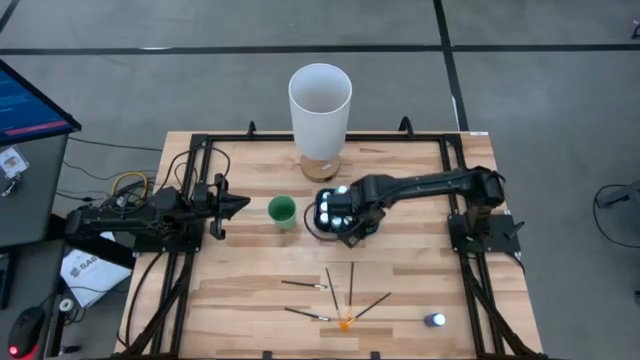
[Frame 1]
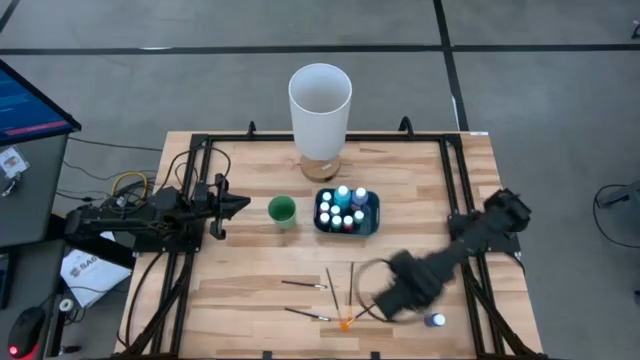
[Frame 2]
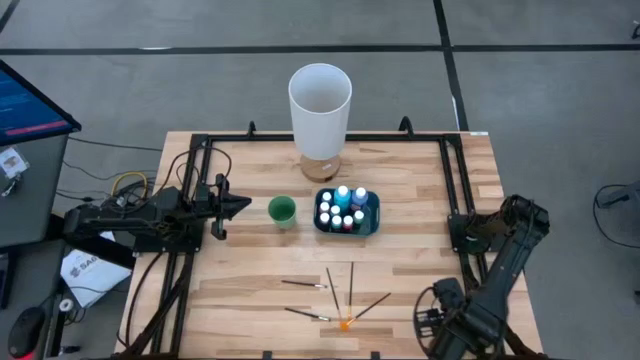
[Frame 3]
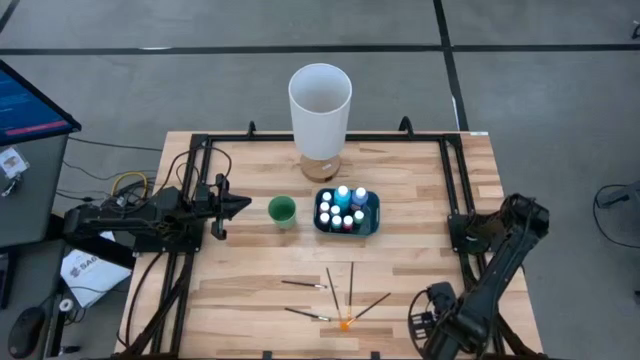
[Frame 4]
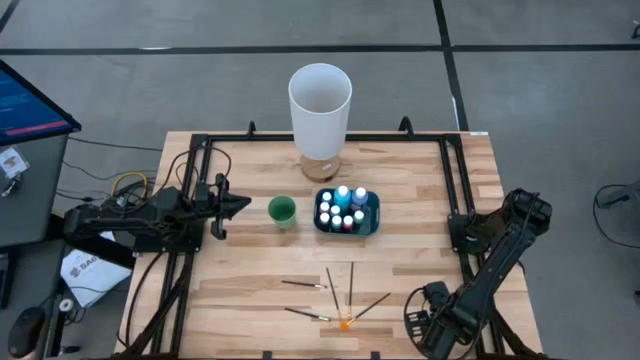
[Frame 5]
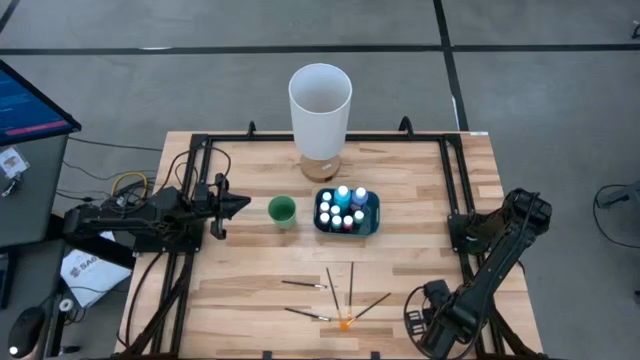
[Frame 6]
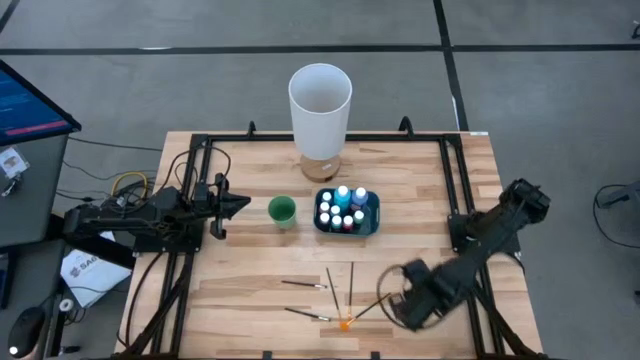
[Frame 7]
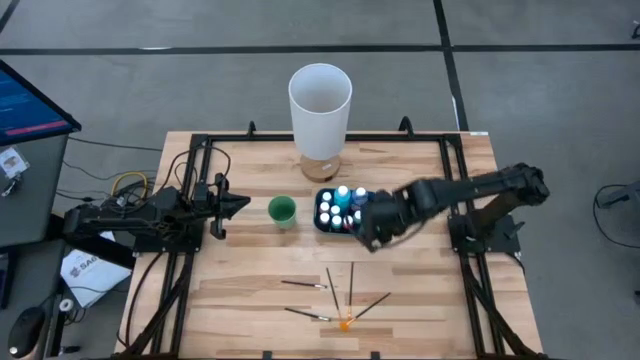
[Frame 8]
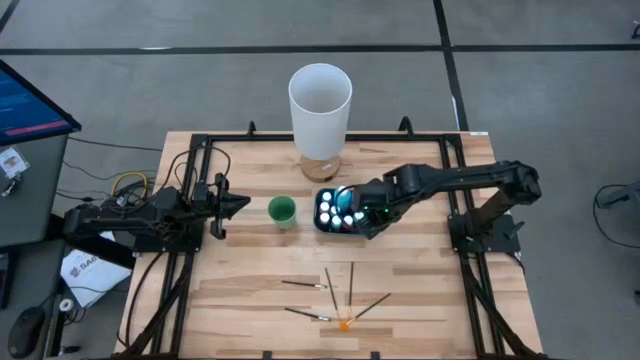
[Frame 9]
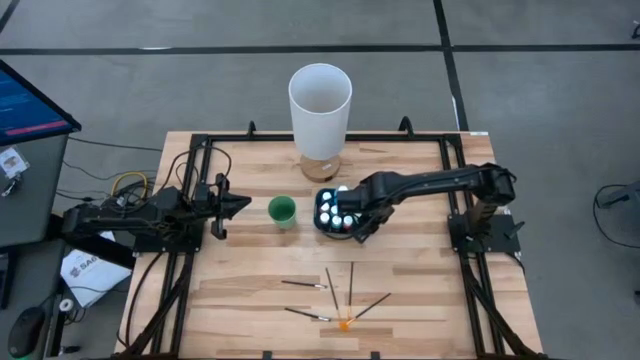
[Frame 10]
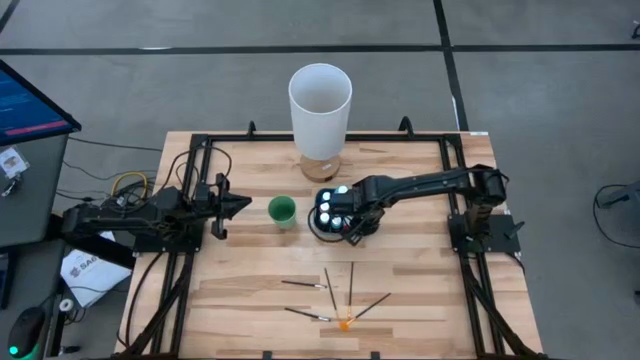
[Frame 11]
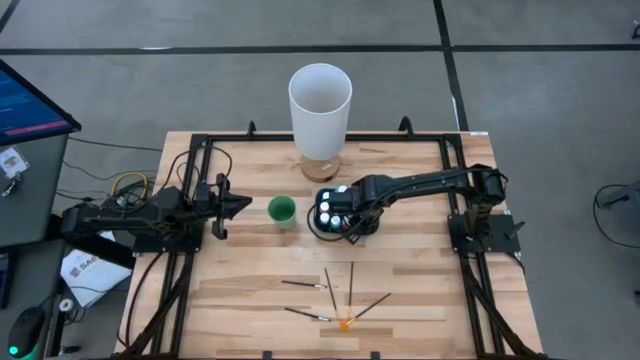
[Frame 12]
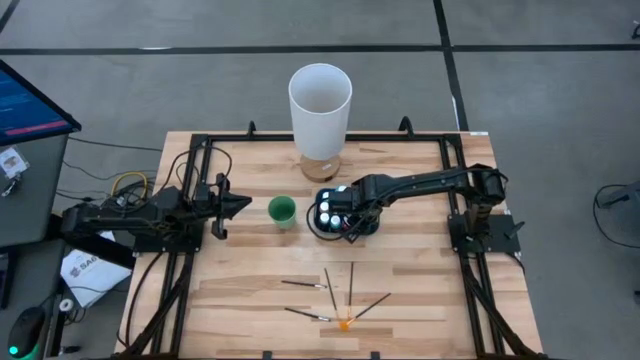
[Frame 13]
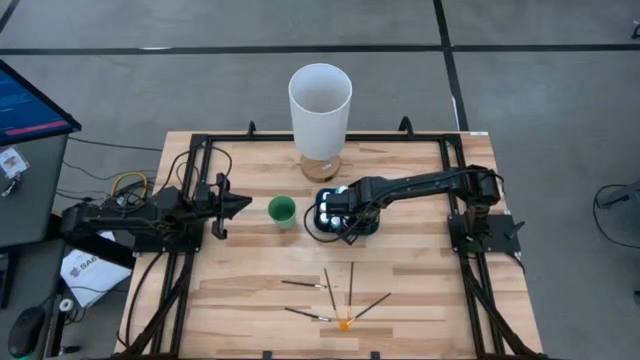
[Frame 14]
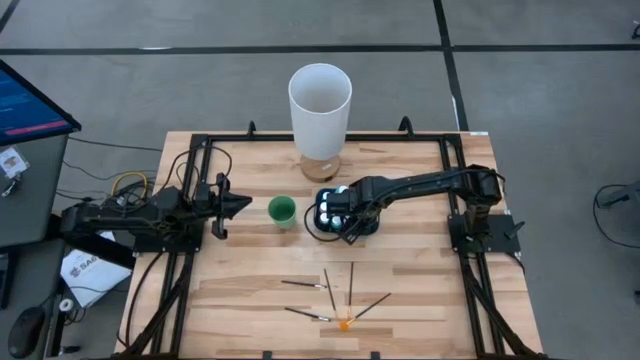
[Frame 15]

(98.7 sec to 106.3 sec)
Task: Pick & Place Paint Supplies
Put the small blue paint bottle into the green bin

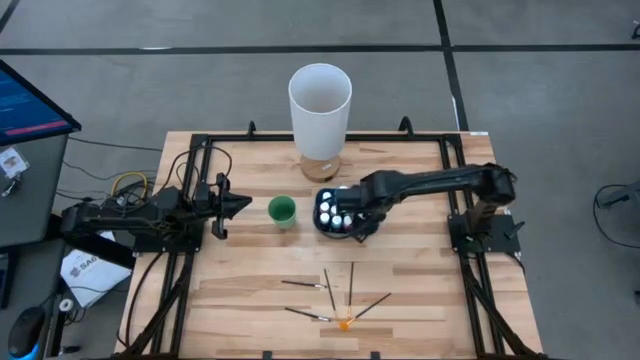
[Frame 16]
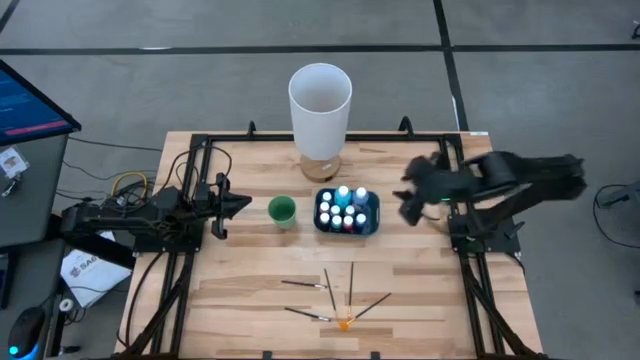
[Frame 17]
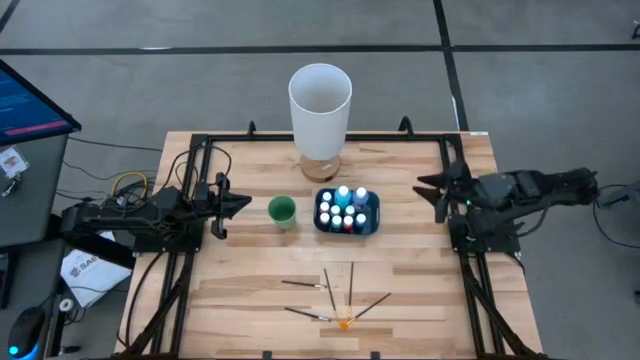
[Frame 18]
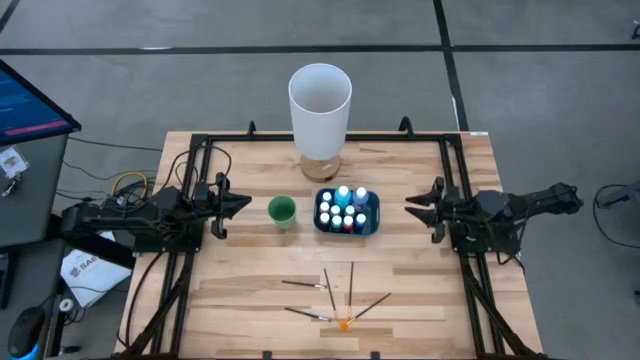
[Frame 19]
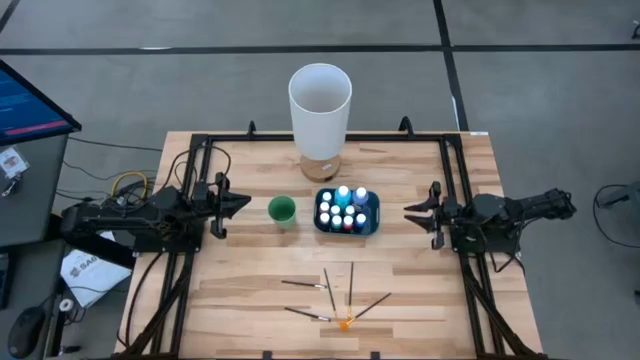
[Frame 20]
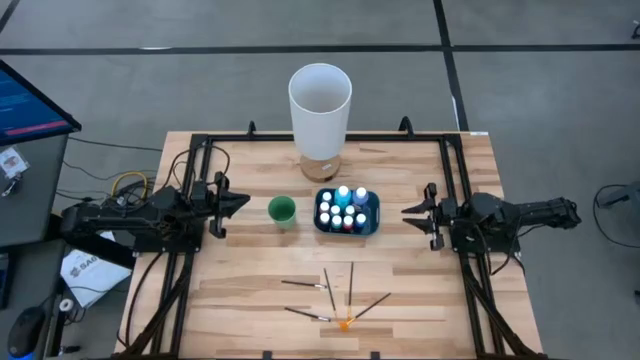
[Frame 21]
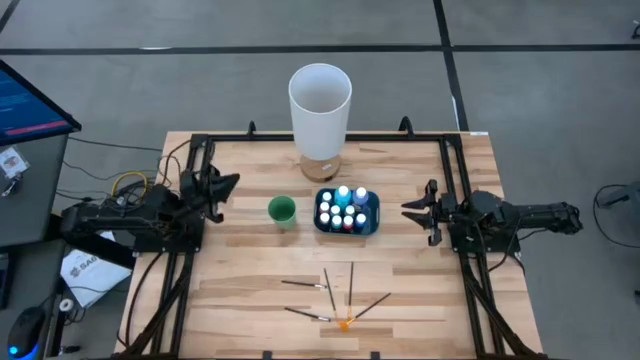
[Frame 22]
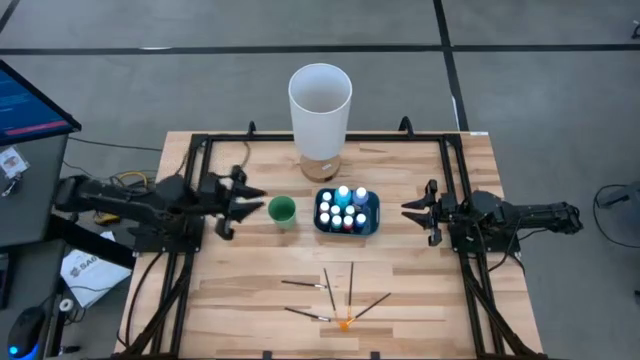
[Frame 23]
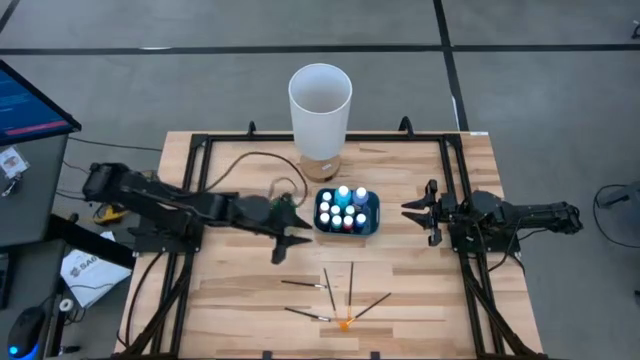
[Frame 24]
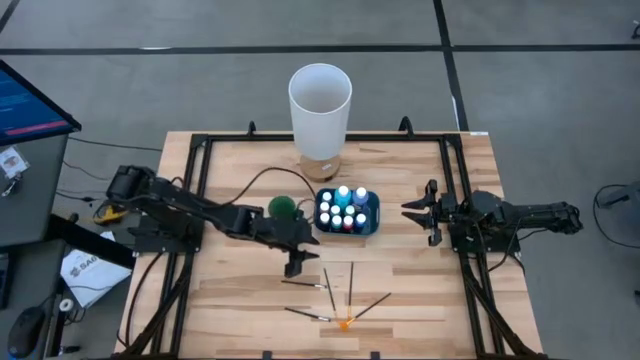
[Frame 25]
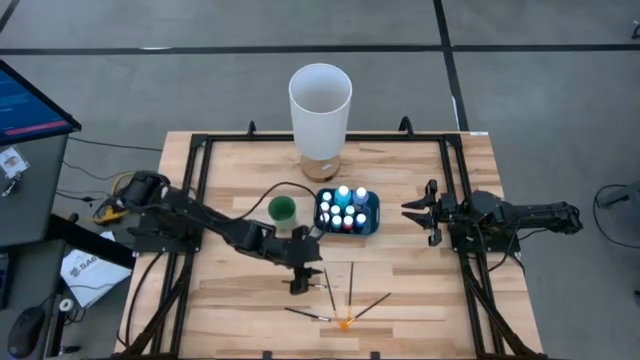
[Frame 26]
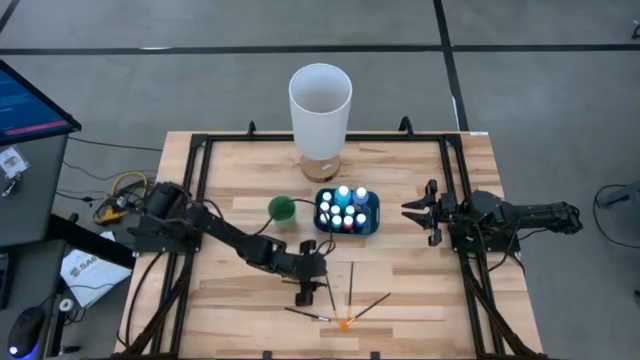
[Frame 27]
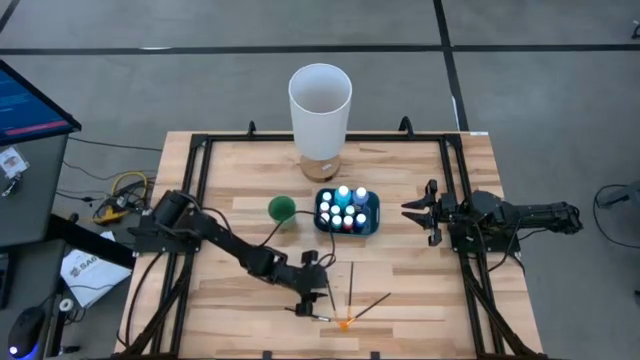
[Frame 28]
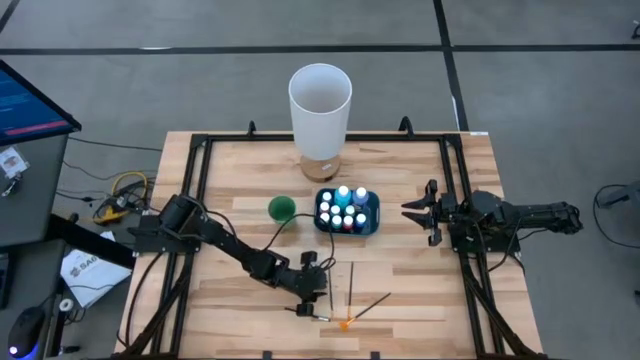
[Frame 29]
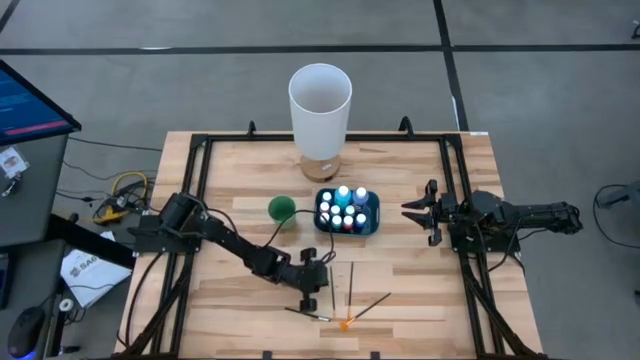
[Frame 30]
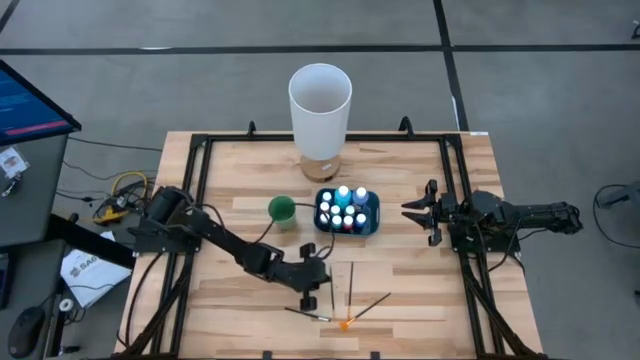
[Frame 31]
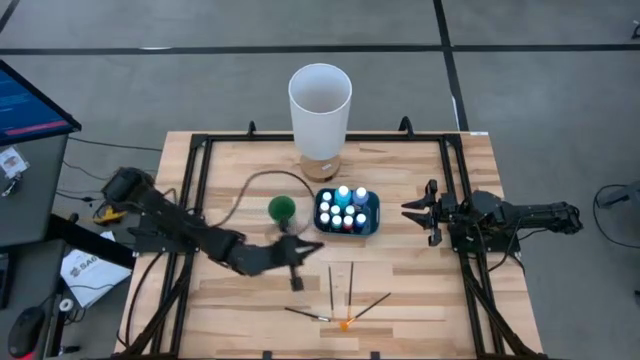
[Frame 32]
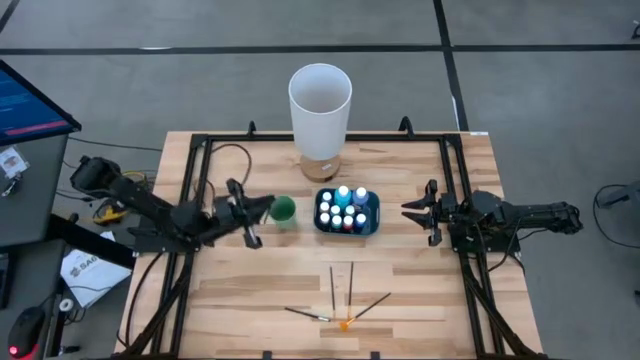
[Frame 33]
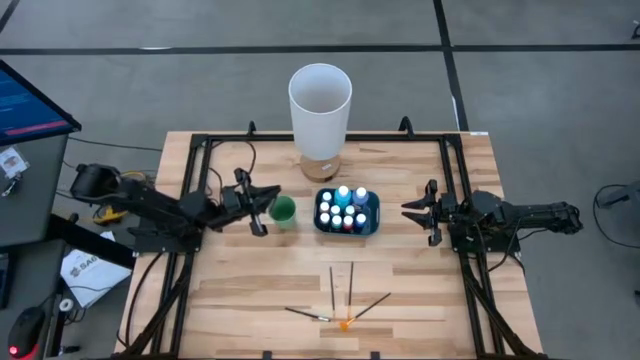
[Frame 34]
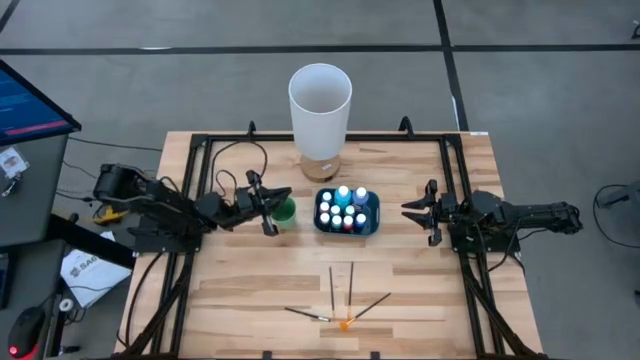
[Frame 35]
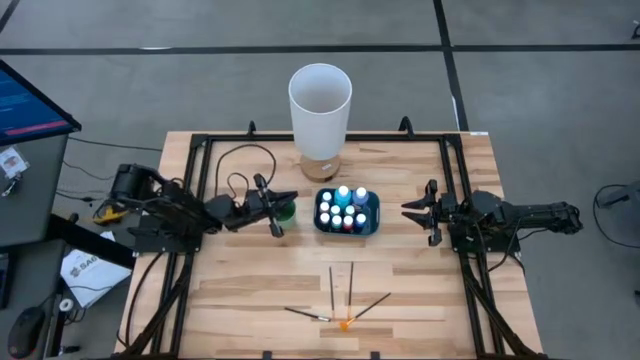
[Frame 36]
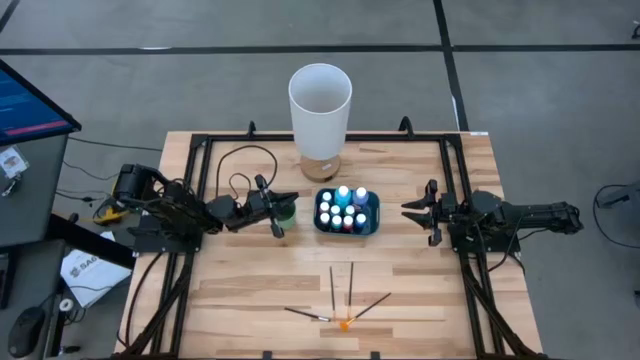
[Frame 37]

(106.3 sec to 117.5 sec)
Put the top silver paintbrush into the green cup

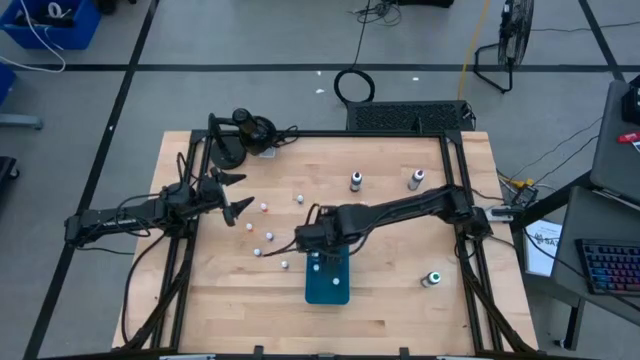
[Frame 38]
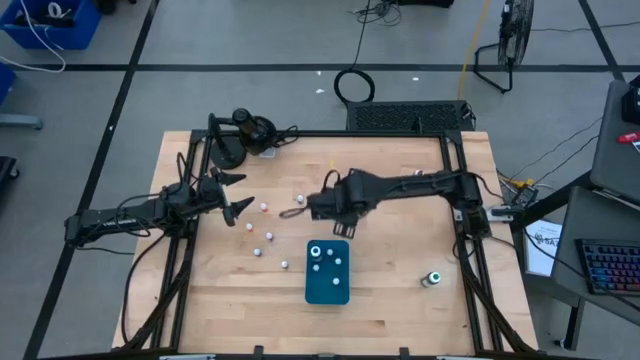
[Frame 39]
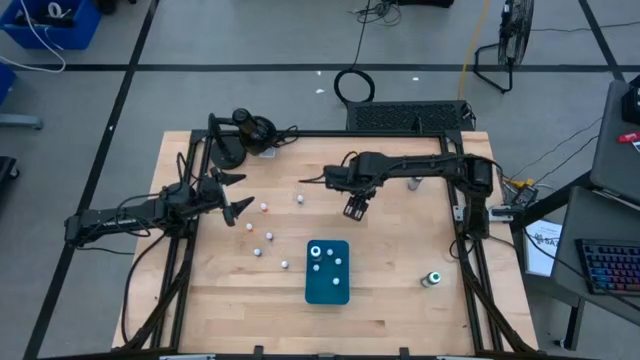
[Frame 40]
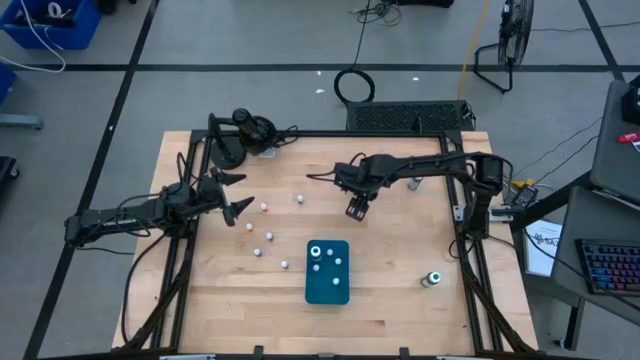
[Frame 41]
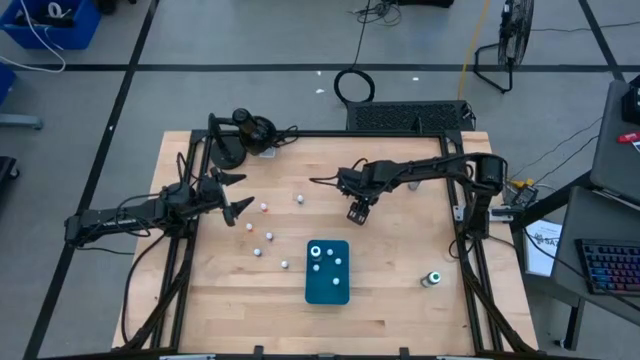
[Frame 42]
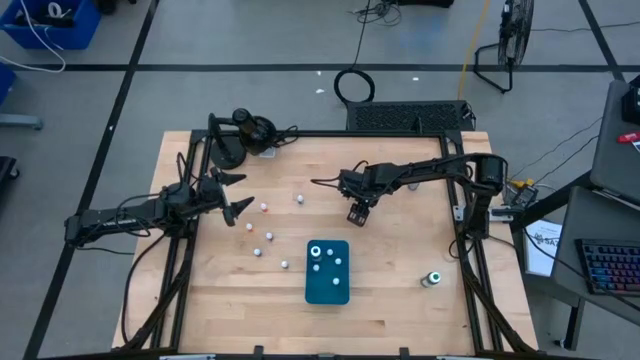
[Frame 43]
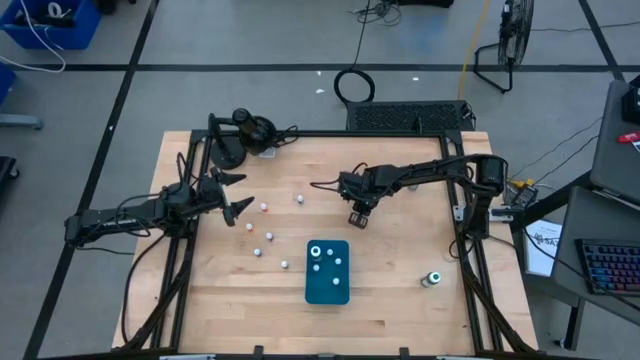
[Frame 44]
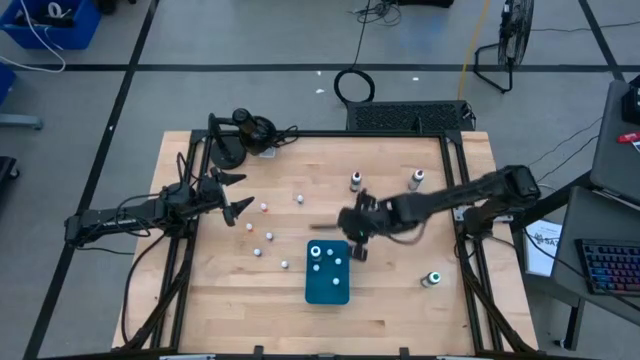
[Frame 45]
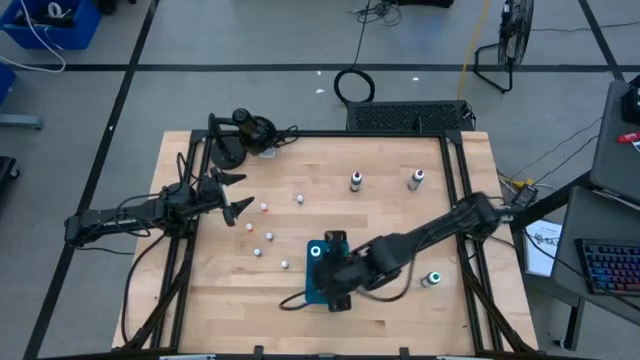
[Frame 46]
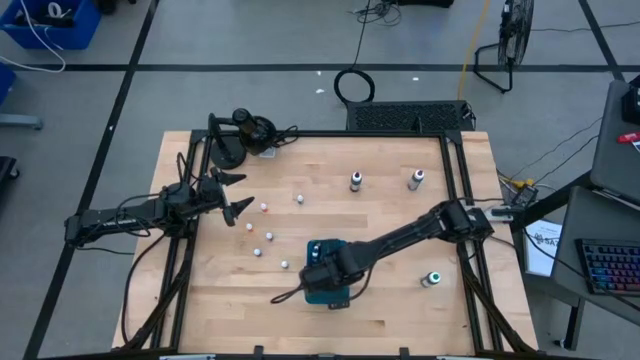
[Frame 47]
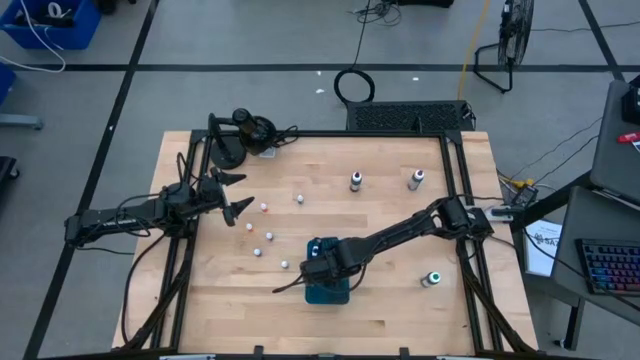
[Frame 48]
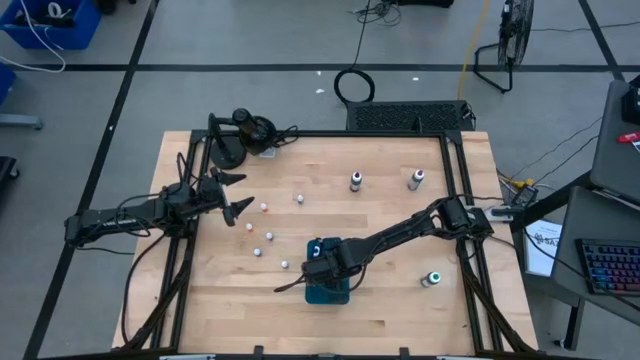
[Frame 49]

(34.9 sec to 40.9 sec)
Task: Pick & Place food coloring
Put the orange small food coloring bottle into the blue bin
